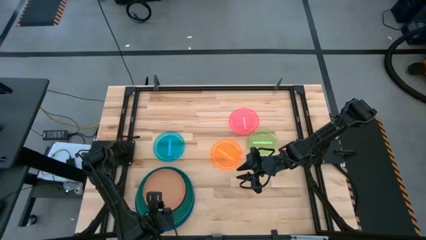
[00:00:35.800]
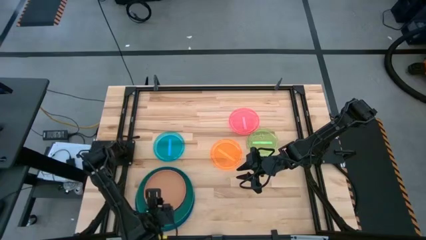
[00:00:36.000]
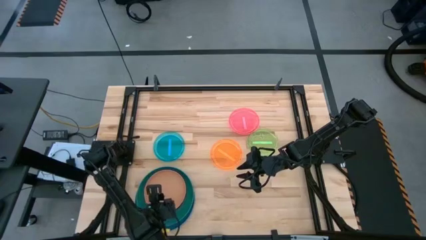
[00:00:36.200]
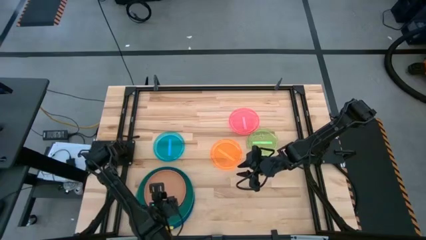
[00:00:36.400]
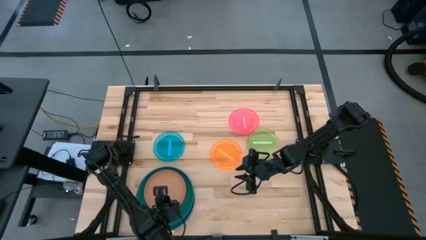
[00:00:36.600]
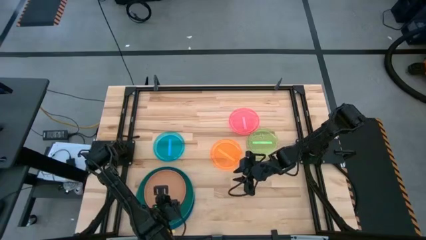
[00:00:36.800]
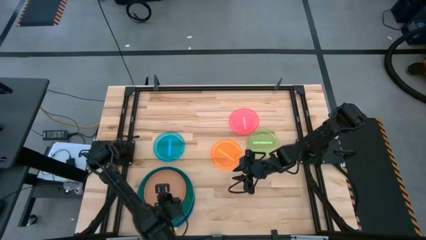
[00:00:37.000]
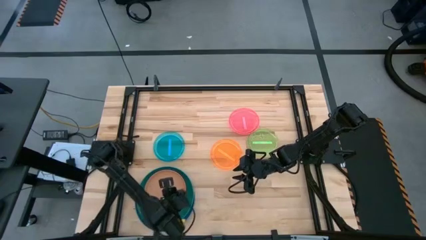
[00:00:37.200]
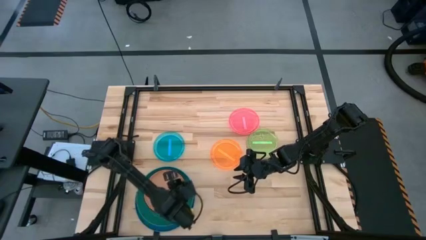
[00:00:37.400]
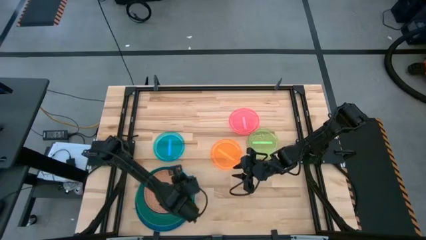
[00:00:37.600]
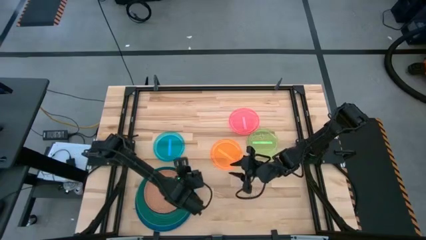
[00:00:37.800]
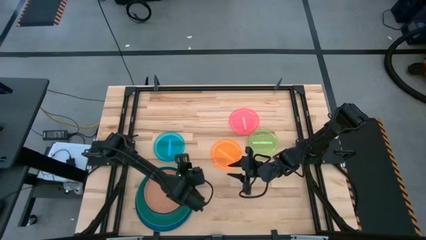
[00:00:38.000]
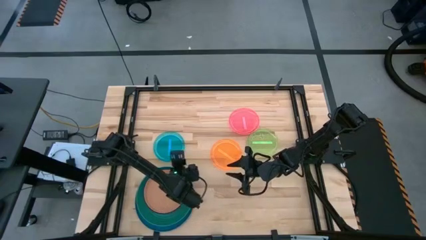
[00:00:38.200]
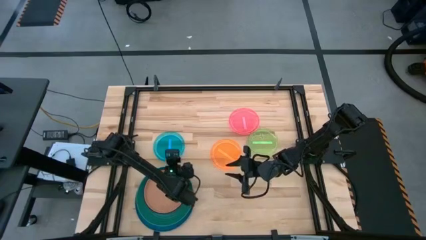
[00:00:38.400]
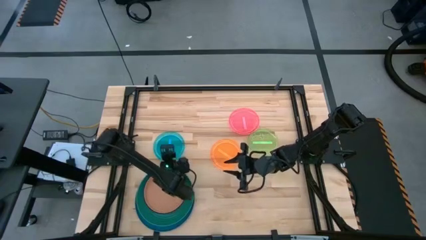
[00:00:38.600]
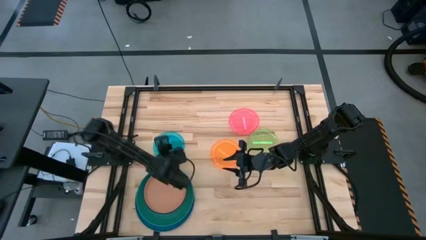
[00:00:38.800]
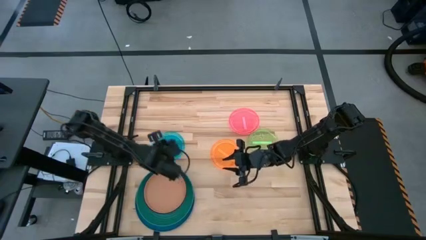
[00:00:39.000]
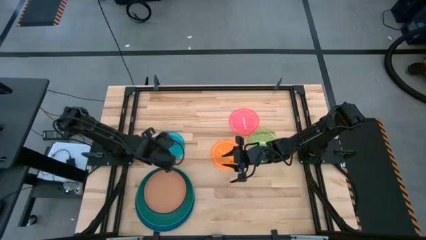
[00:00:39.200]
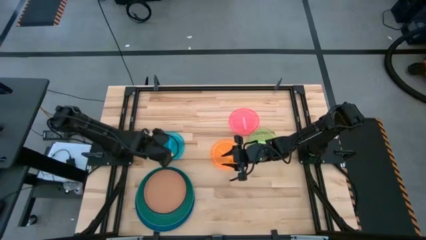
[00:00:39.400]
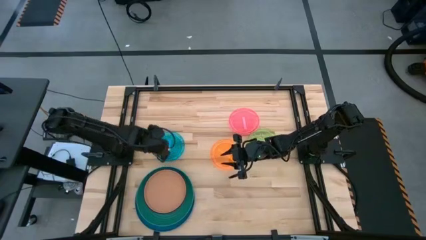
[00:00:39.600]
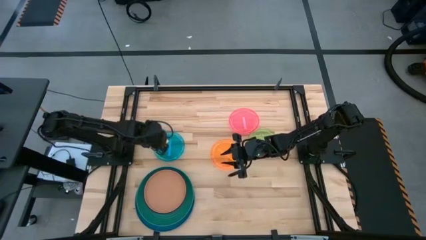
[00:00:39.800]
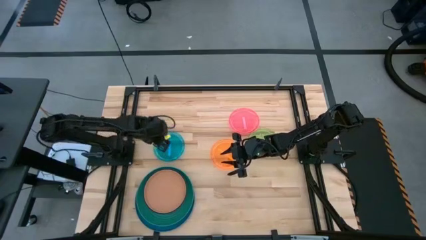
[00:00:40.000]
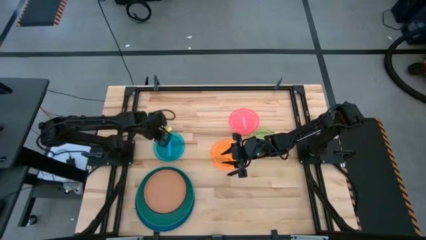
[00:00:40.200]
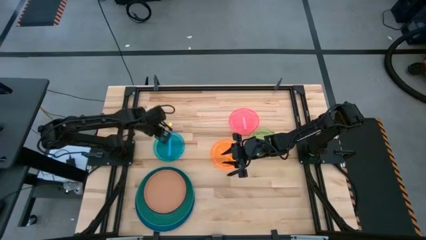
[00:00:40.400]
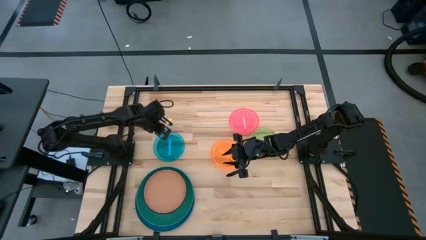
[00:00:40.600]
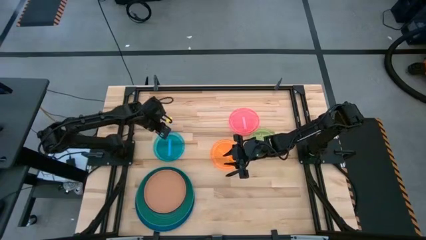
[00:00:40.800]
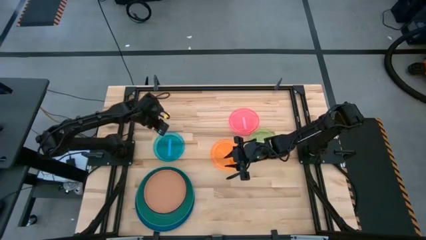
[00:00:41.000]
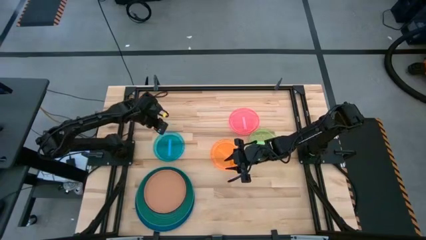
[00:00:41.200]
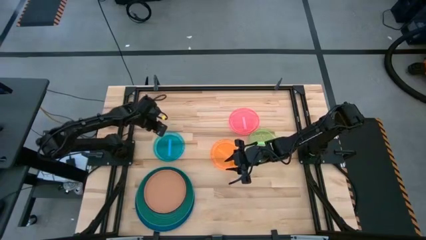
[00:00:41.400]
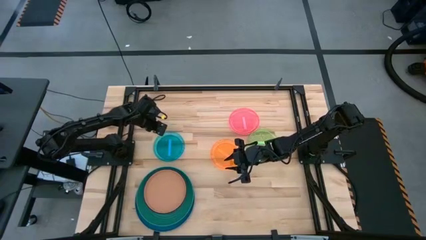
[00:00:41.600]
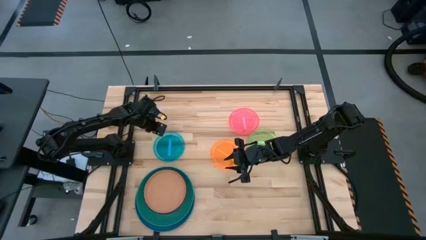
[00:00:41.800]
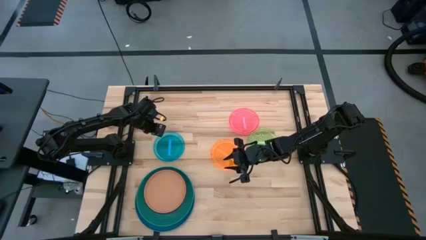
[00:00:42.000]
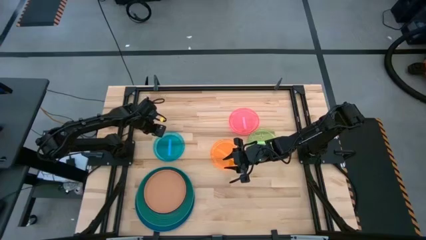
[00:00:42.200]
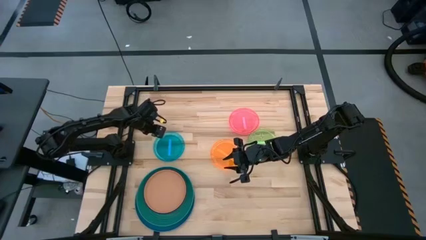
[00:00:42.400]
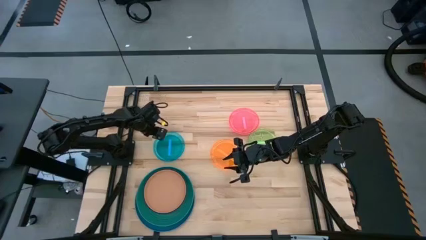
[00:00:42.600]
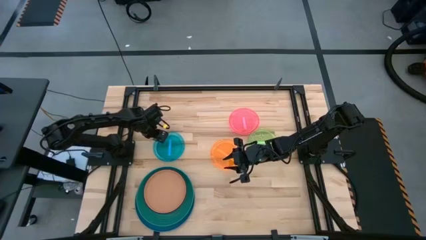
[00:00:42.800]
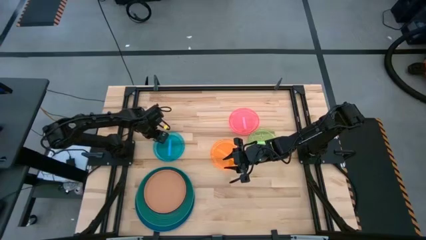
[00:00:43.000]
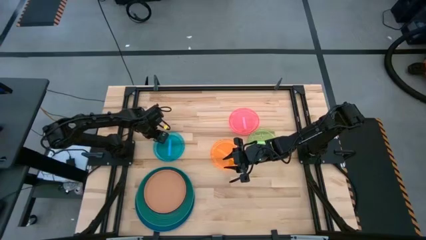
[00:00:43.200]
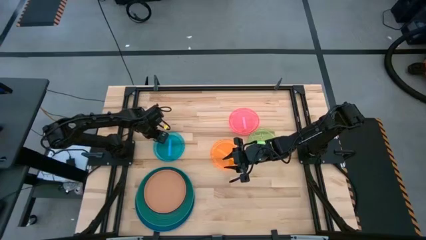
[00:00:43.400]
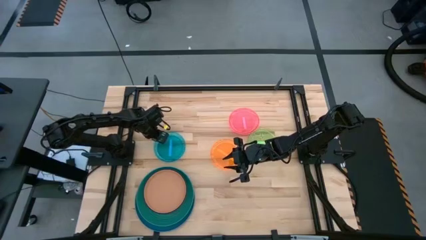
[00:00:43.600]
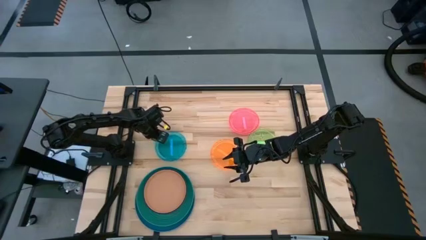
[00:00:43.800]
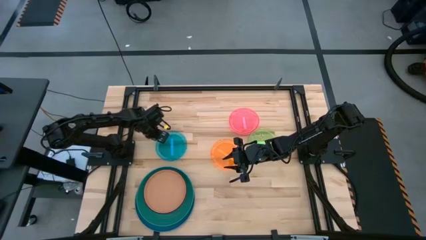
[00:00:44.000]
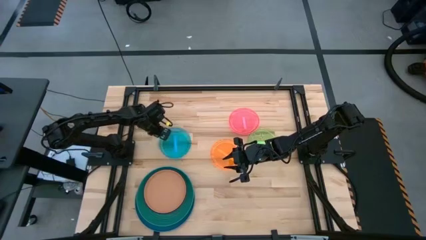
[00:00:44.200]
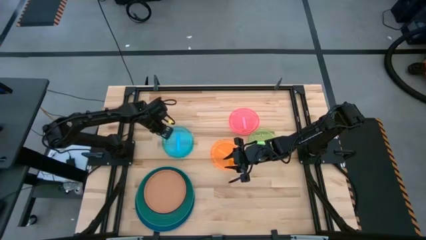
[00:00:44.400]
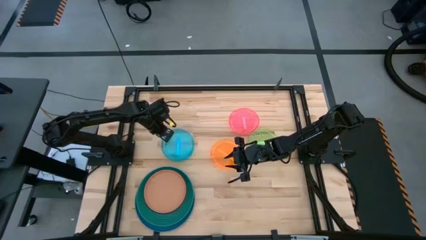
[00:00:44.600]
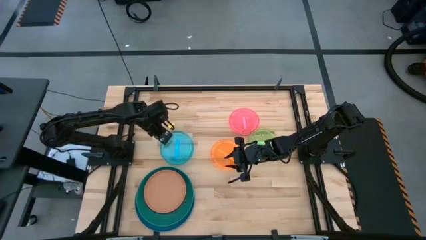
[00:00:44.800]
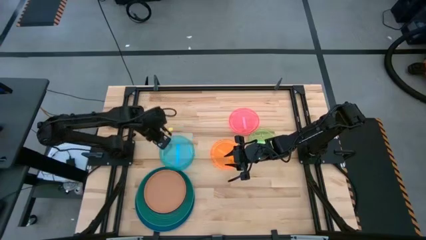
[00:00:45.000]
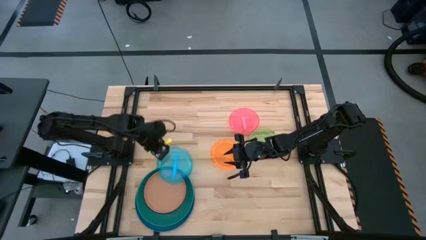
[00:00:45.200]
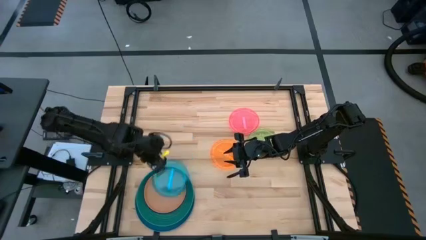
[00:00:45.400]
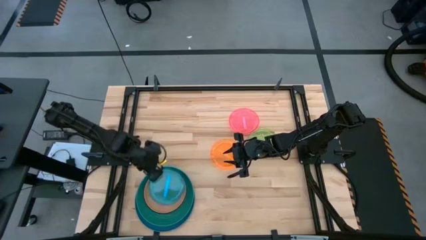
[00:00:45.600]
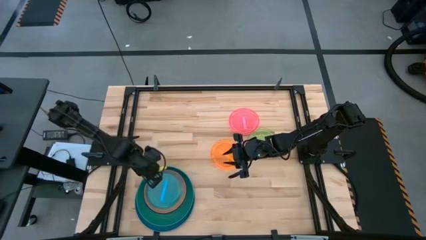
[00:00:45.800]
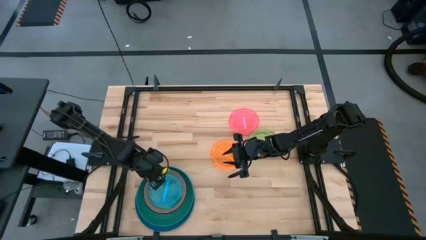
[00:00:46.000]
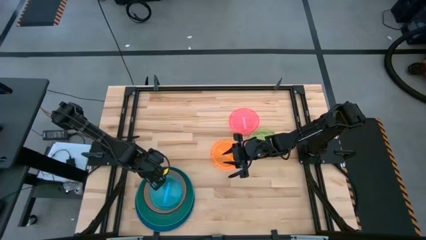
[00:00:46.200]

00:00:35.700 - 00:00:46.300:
Task: Stack plastic plates
Stack the light blue plate on top of the orange plate

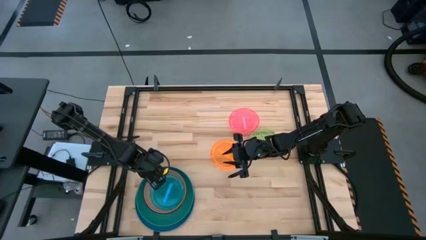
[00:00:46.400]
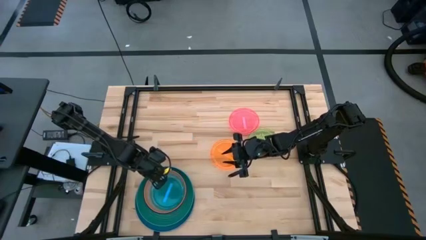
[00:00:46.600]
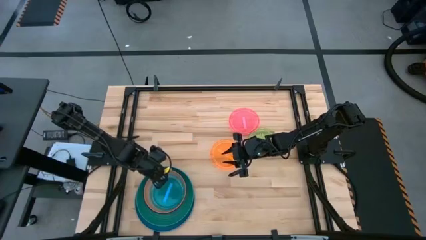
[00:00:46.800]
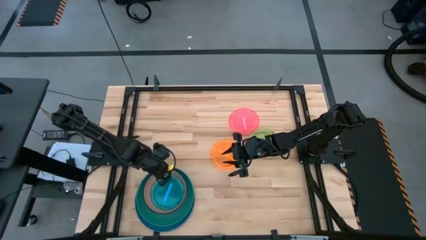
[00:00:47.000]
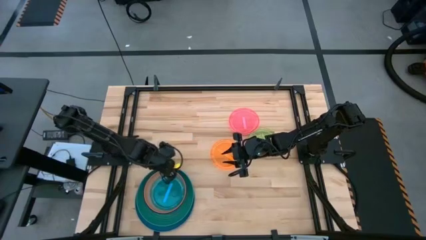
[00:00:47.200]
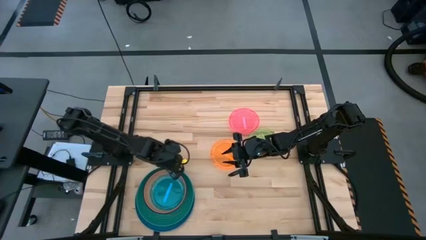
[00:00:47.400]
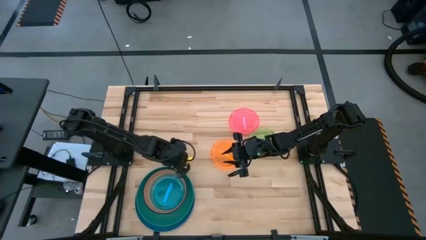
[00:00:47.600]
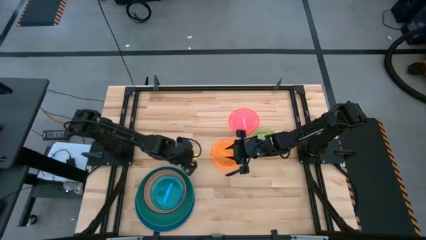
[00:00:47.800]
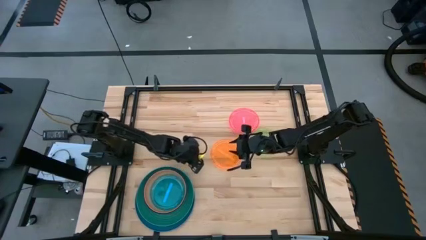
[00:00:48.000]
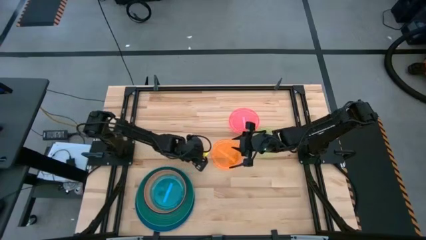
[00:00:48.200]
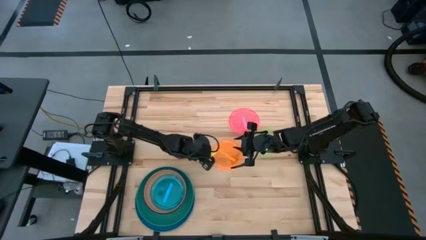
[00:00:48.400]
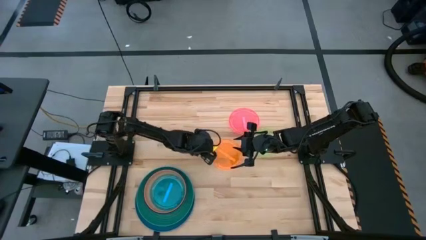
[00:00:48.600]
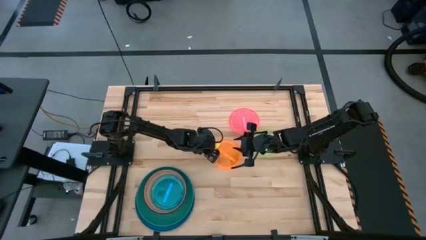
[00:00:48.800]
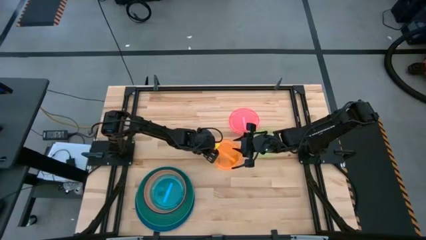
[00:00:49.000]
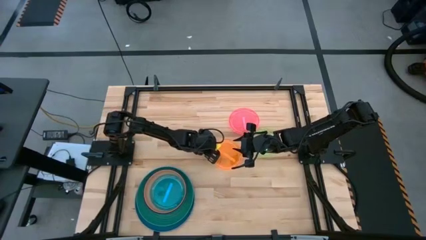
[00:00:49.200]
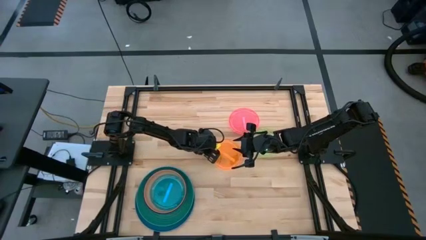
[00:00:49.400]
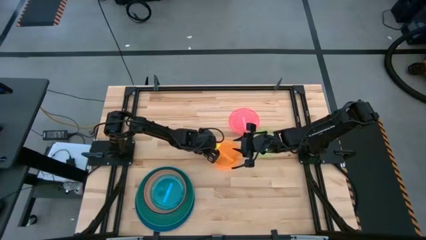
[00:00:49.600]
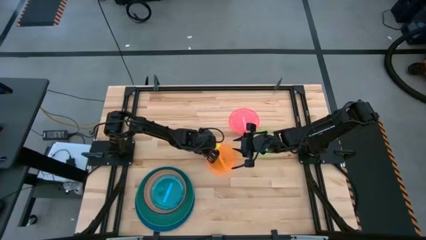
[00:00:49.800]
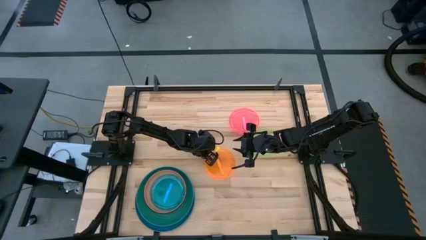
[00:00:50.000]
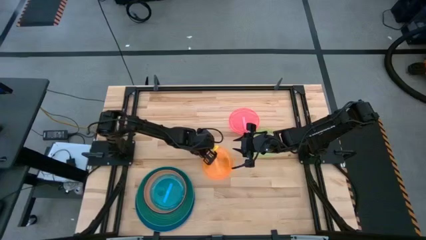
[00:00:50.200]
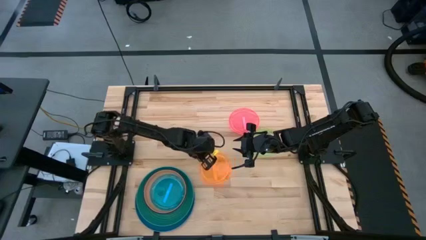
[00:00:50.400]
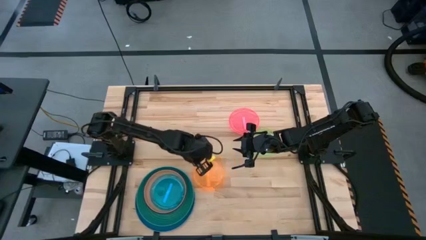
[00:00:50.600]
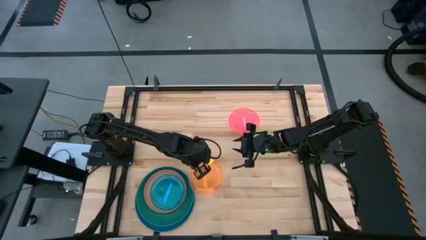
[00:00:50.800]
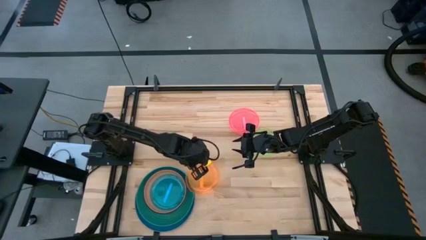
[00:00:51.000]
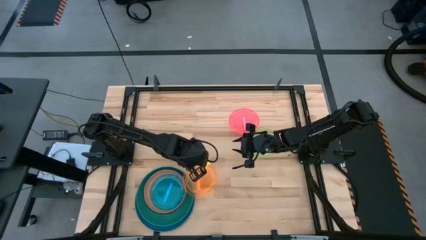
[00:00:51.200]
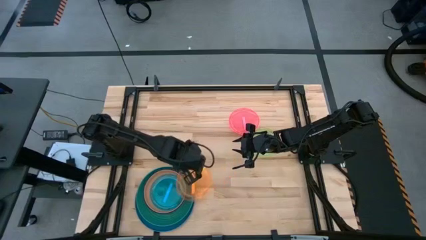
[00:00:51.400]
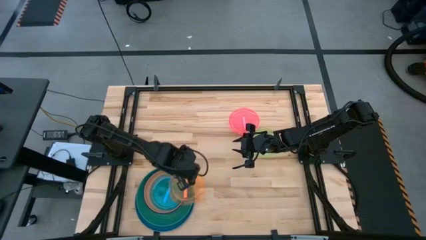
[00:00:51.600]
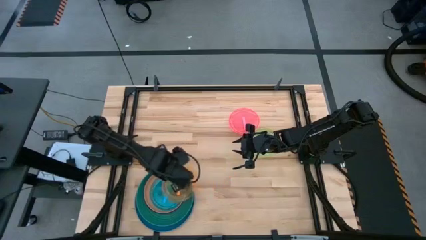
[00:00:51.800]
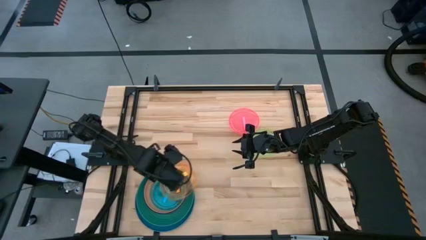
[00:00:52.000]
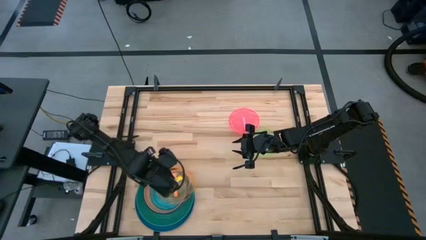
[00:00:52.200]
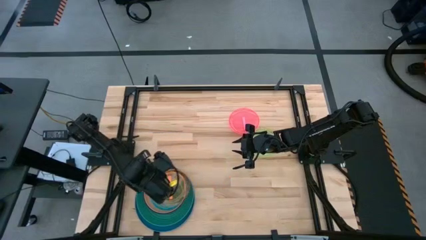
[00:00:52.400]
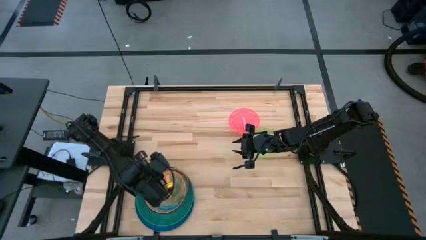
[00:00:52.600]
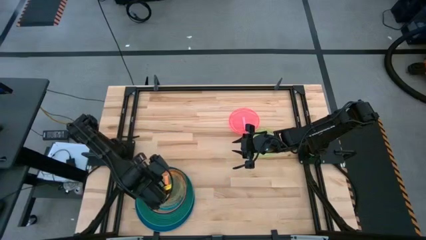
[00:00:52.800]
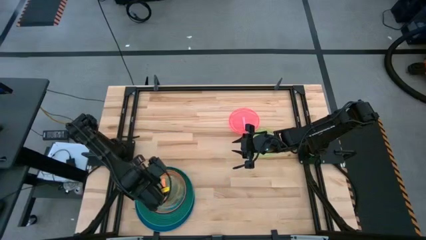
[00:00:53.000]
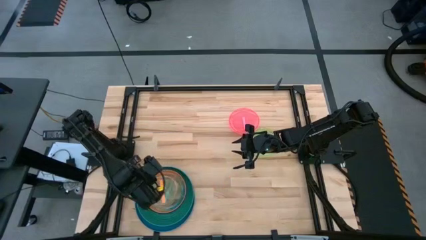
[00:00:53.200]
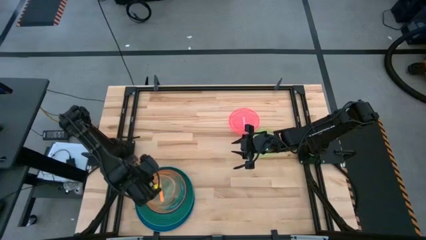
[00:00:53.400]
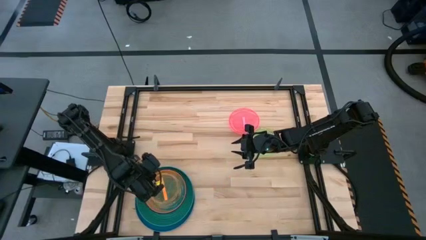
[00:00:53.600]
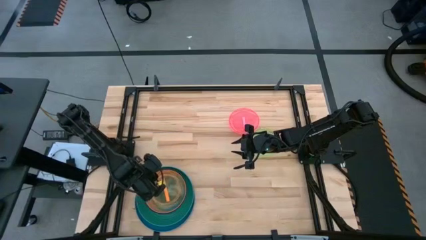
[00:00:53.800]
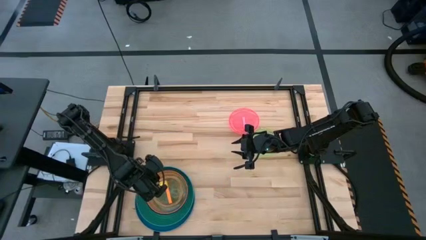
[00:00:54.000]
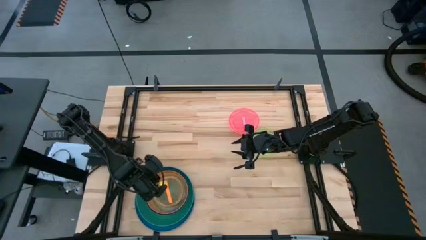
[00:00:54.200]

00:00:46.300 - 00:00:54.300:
Stack the light orange plate on top of the light blue plate
